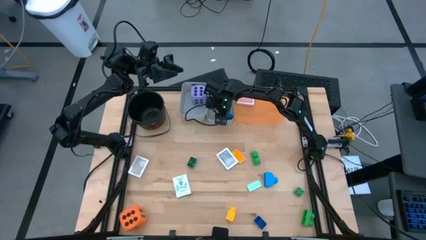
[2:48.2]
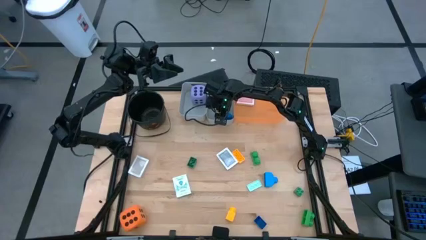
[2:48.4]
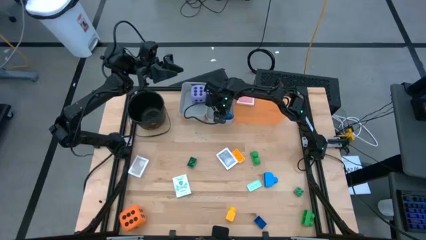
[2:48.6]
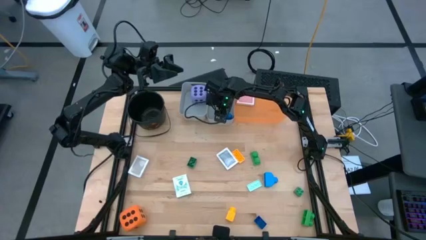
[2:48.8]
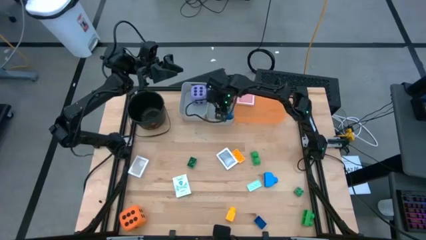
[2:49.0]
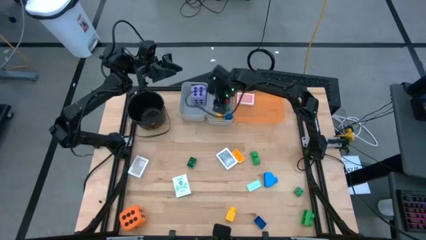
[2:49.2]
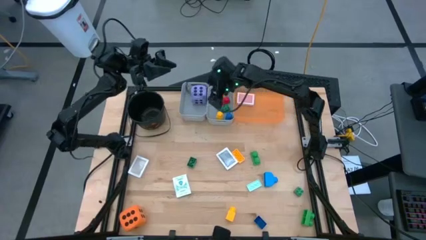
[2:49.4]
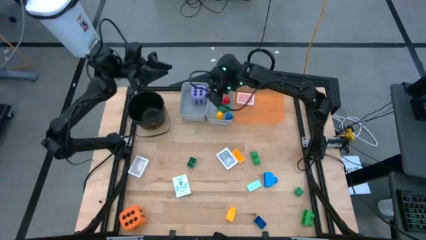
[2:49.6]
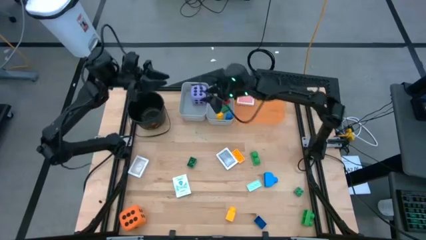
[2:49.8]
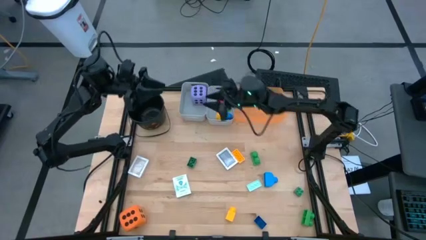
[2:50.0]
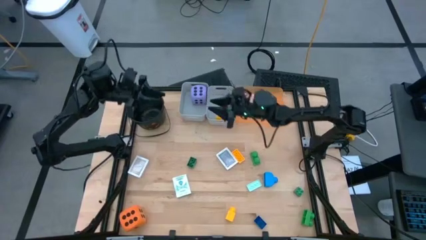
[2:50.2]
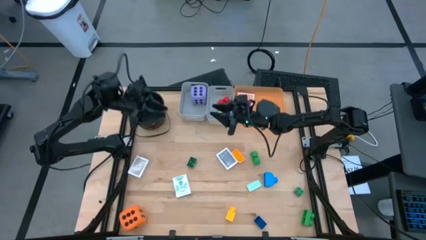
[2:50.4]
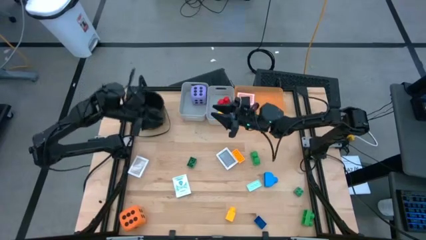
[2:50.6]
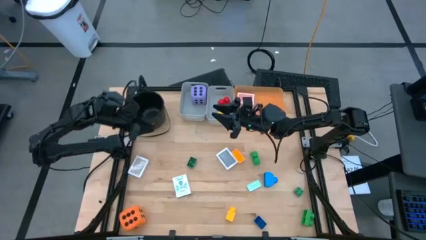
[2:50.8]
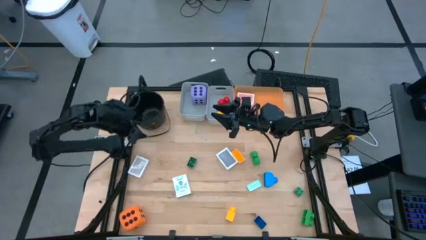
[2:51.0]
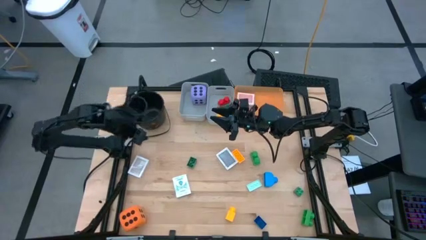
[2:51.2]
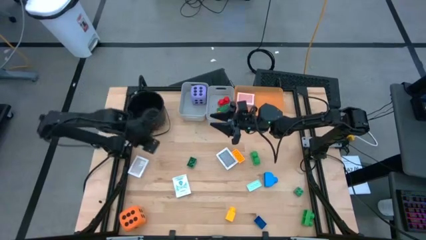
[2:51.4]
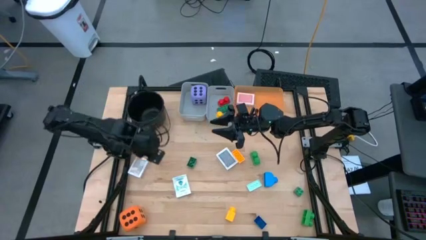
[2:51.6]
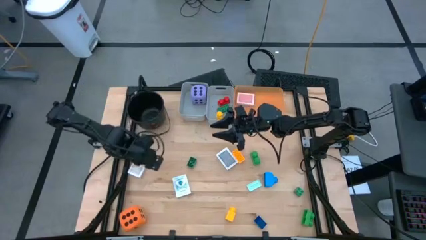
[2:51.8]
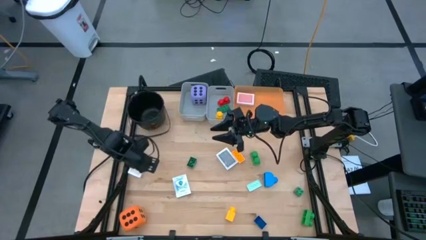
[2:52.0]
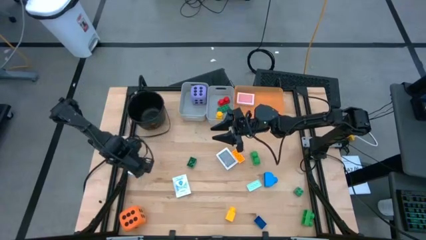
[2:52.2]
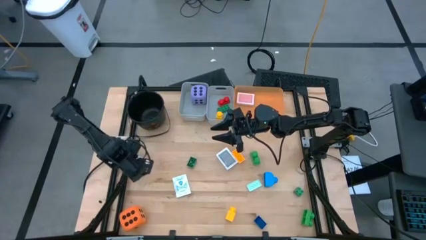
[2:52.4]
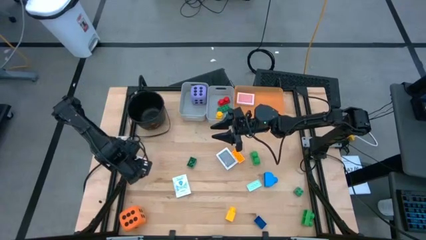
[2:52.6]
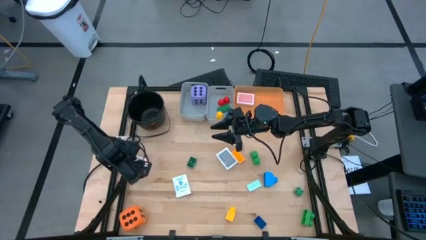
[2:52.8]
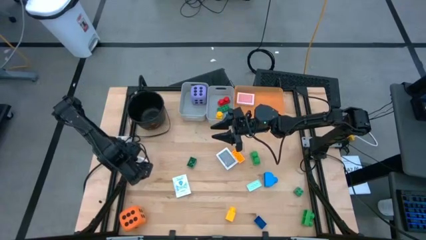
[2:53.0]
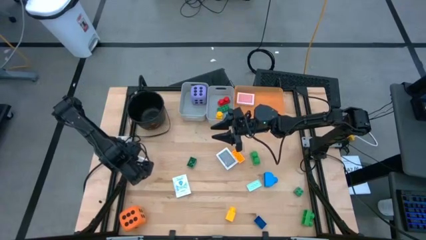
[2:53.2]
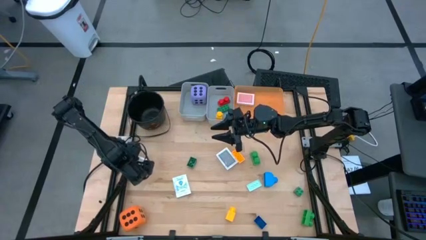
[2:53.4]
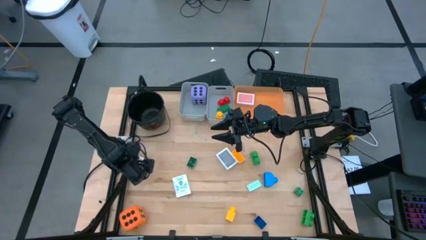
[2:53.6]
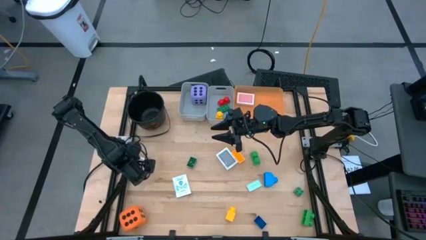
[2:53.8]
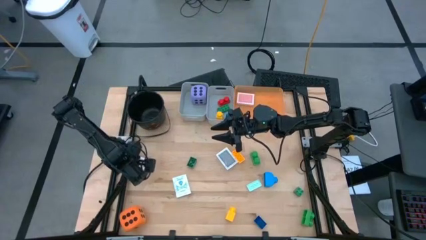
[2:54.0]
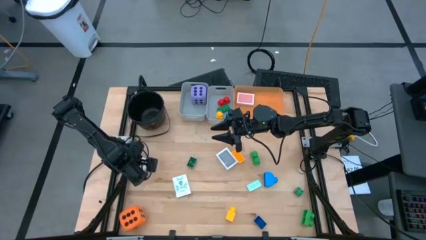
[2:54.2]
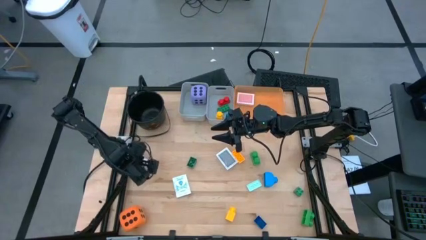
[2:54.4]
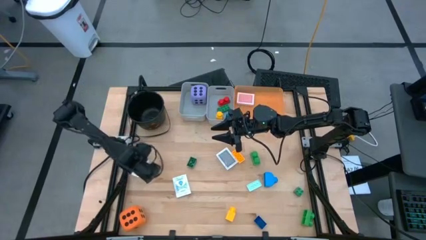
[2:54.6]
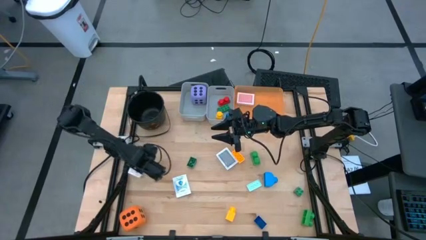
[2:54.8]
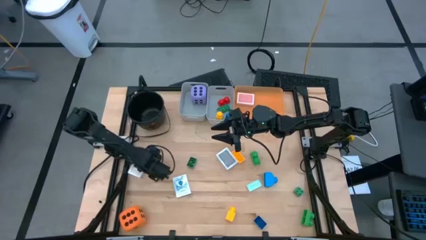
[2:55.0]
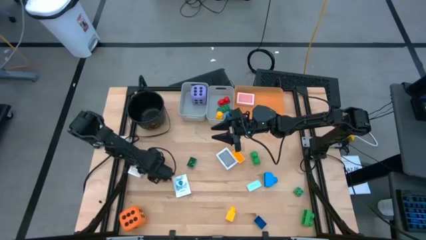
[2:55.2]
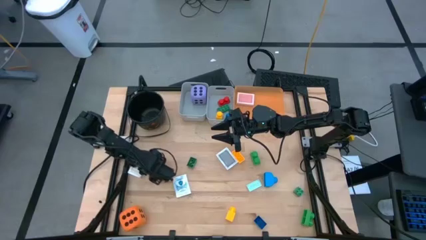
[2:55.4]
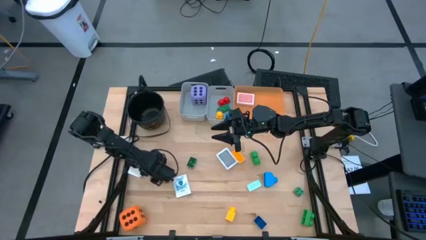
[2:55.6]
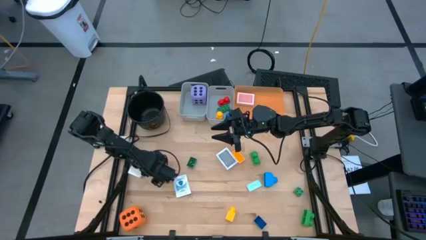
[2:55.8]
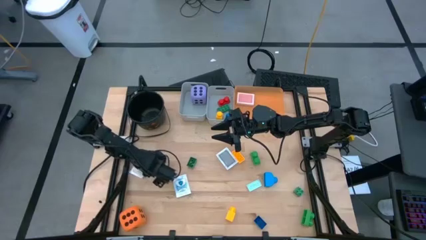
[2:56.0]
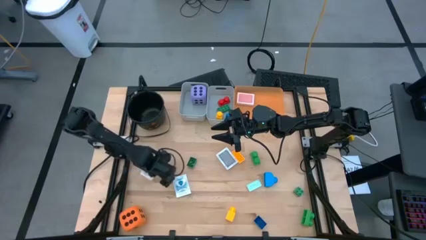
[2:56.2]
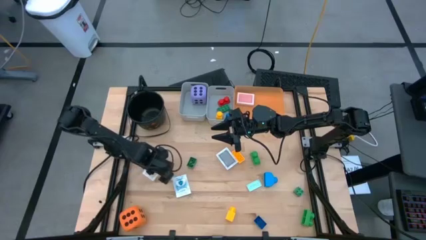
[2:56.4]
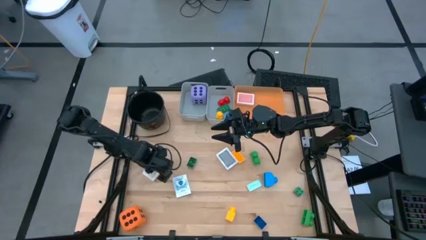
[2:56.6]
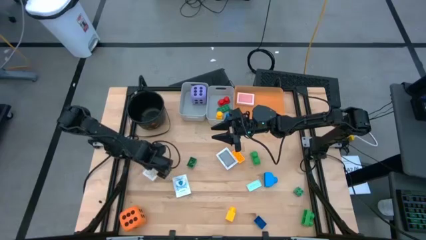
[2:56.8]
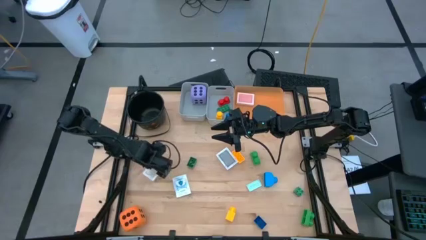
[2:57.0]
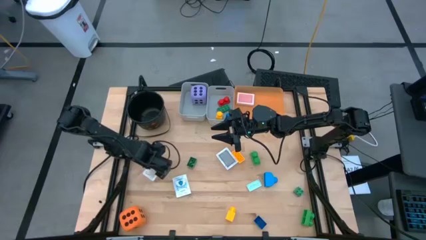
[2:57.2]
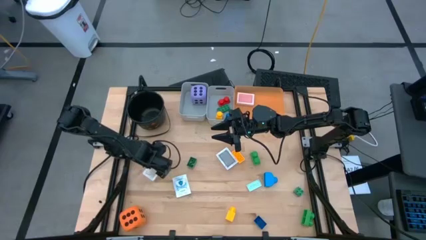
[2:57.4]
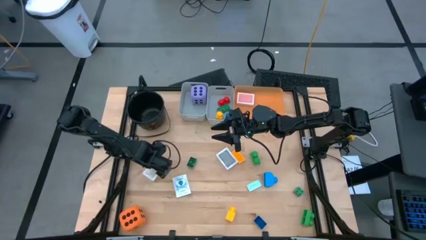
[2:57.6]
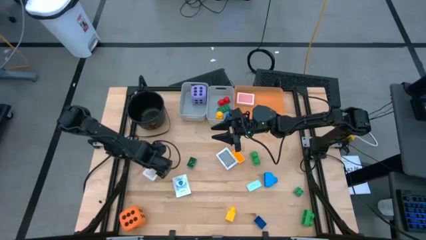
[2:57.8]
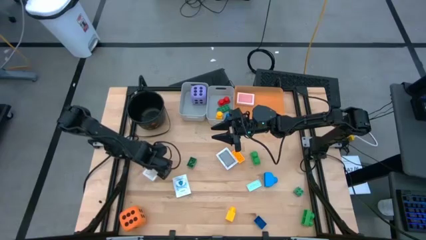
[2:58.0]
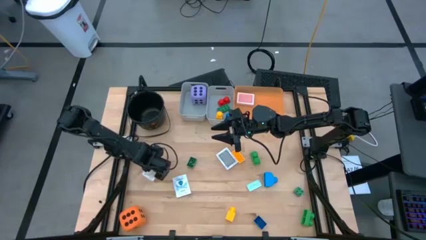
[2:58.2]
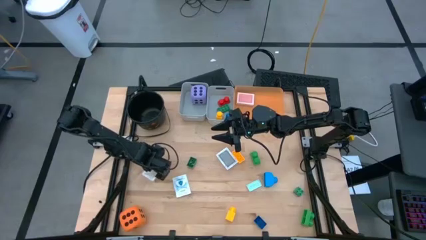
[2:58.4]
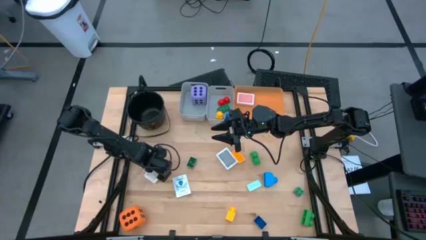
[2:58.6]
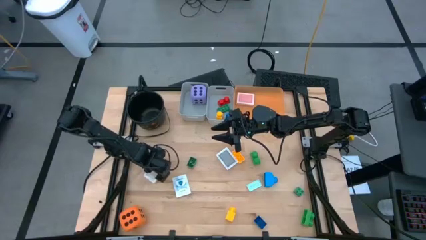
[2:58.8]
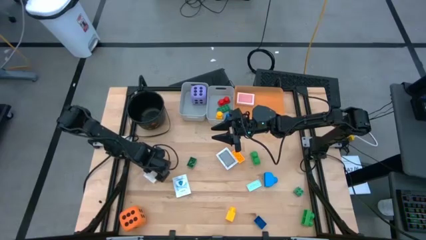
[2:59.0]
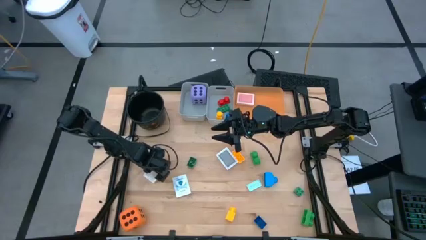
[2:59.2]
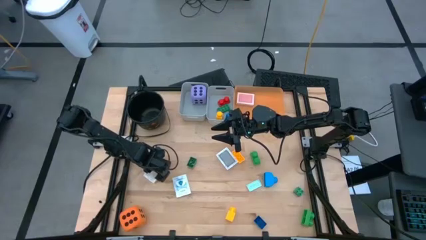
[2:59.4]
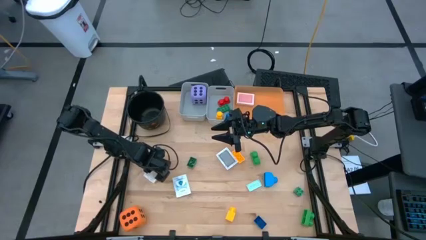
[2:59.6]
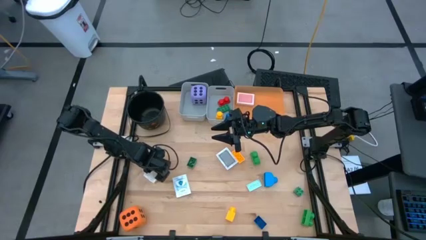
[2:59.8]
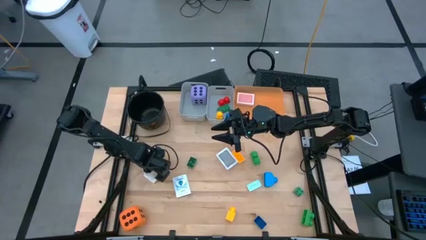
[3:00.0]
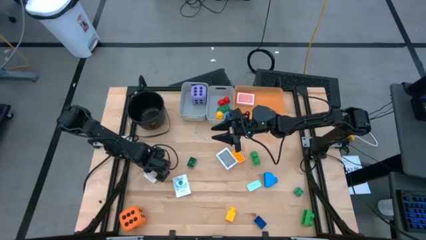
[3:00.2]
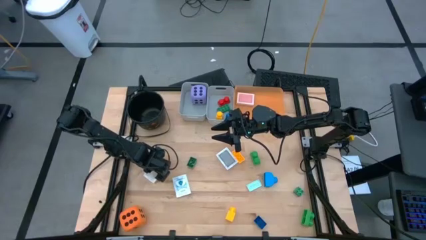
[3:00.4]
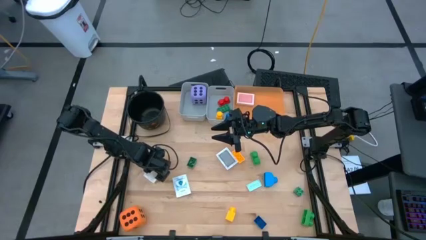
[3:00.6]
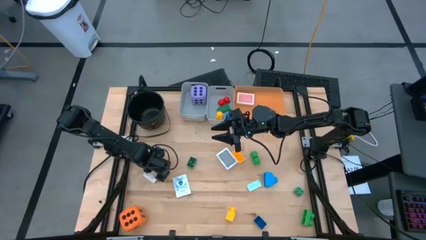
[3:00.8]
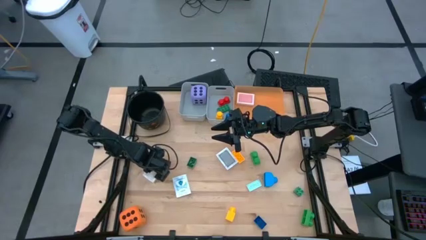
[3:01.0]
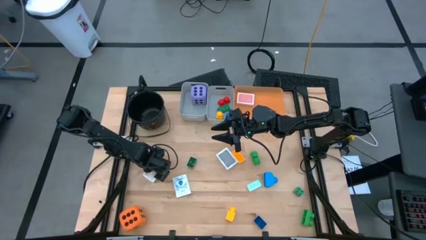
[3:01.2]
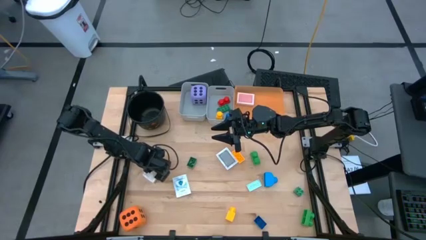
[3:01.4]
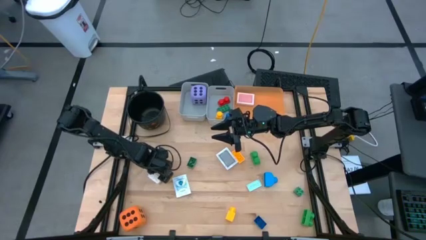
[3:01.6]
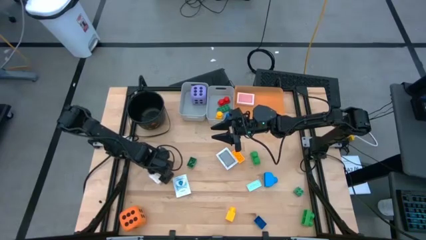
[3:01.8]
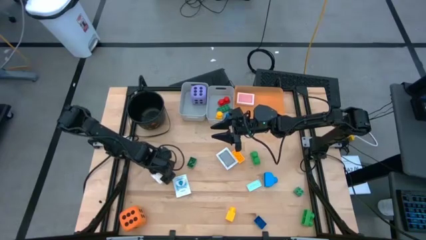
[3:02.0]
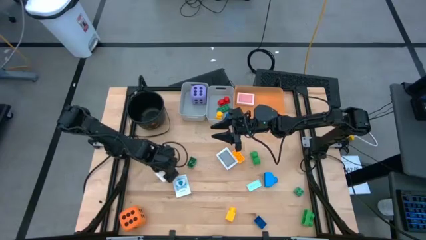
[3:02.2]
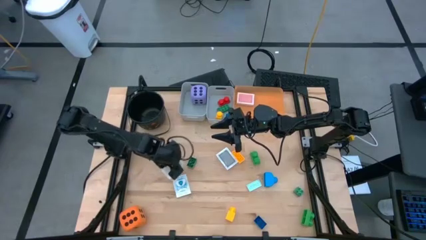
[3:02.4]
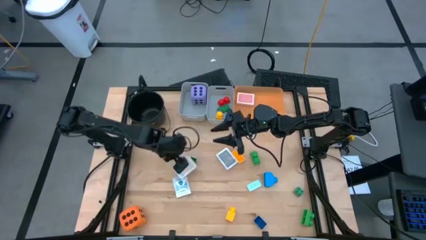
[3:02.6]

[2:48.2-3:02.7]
Task: Pick & Place Toys
Put the brown playing card into the orange bin
